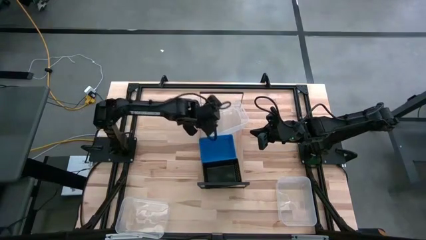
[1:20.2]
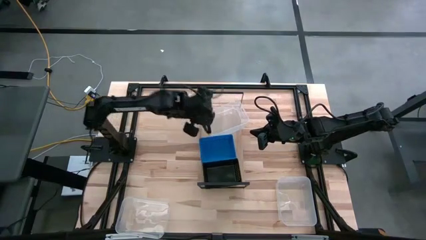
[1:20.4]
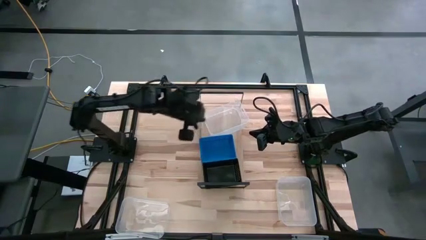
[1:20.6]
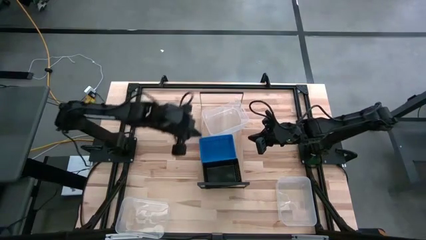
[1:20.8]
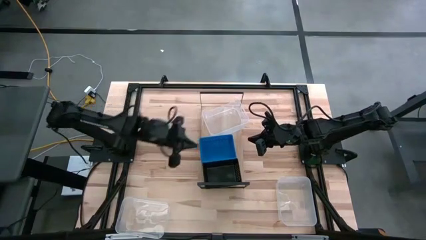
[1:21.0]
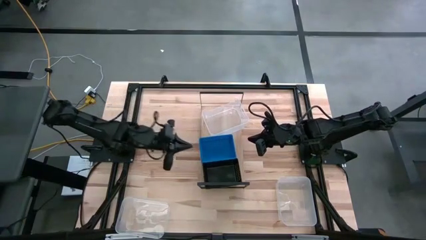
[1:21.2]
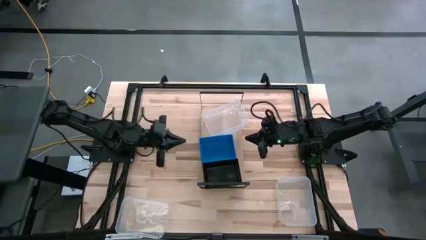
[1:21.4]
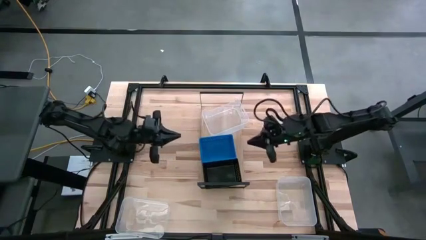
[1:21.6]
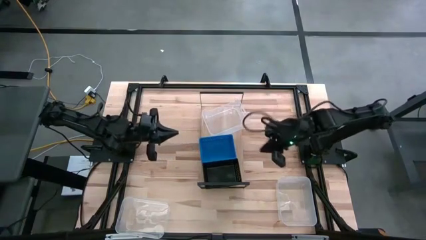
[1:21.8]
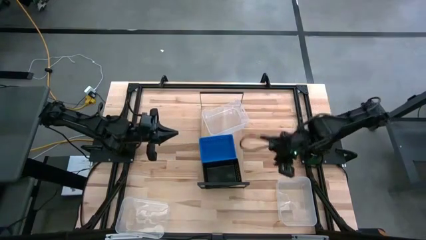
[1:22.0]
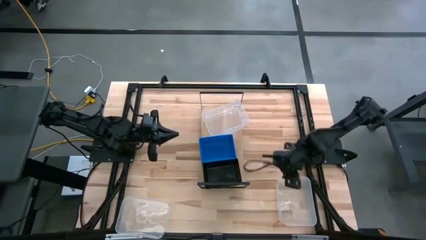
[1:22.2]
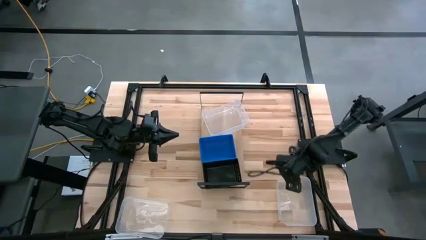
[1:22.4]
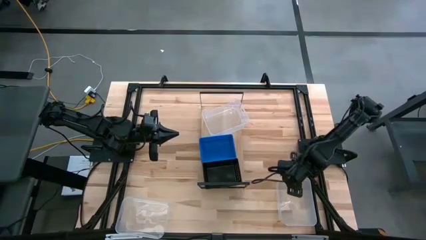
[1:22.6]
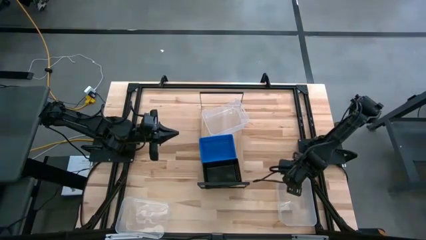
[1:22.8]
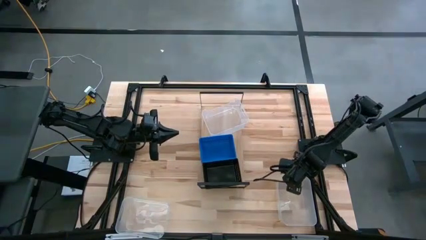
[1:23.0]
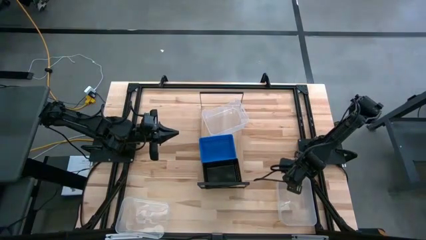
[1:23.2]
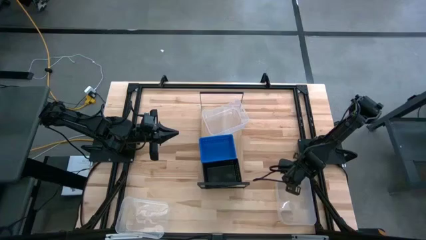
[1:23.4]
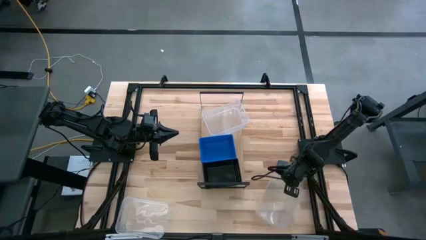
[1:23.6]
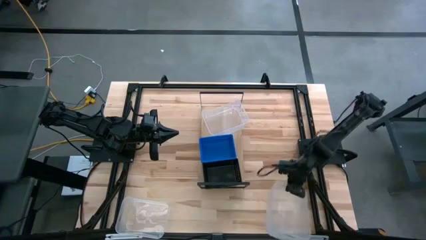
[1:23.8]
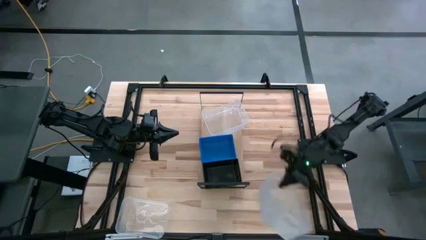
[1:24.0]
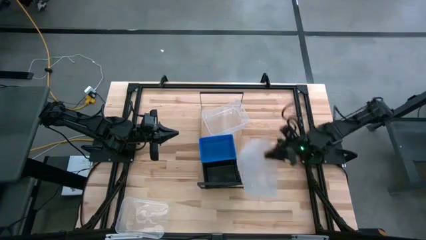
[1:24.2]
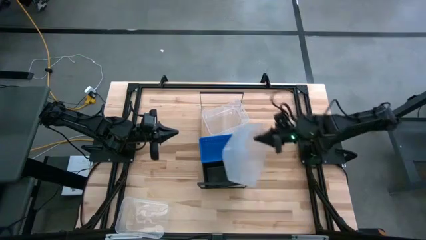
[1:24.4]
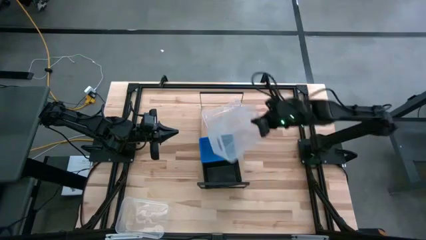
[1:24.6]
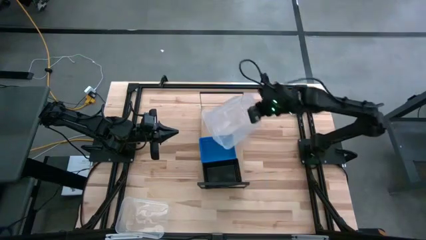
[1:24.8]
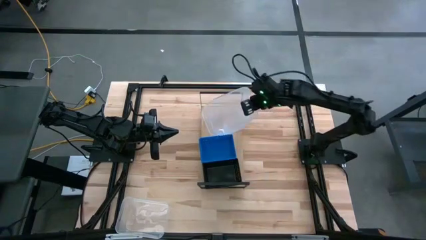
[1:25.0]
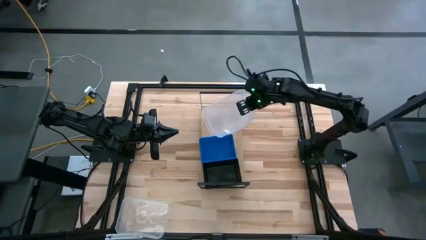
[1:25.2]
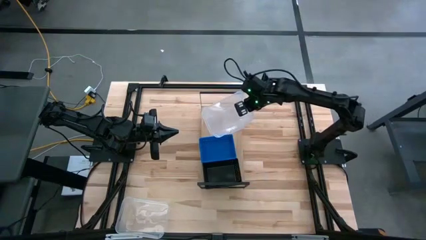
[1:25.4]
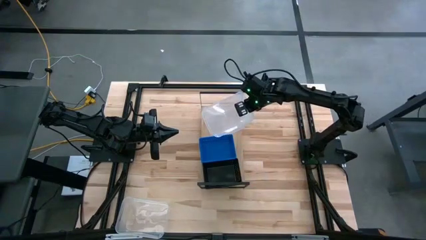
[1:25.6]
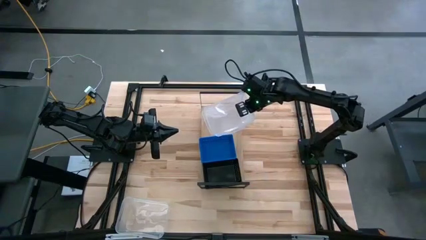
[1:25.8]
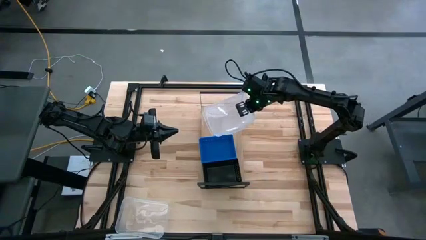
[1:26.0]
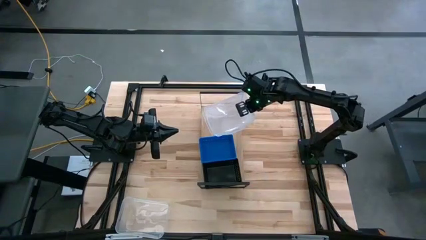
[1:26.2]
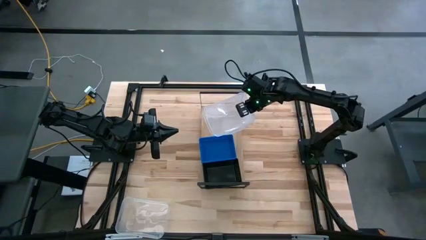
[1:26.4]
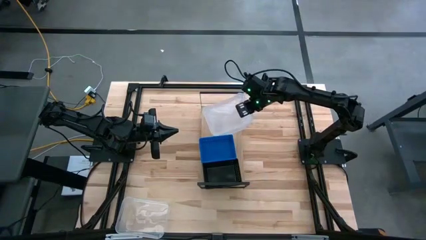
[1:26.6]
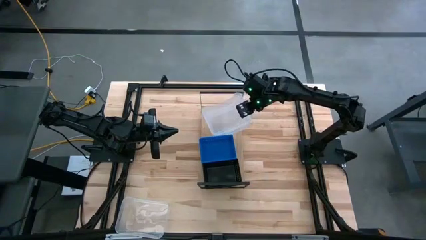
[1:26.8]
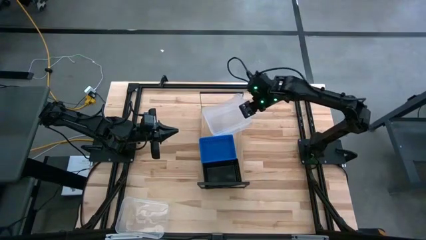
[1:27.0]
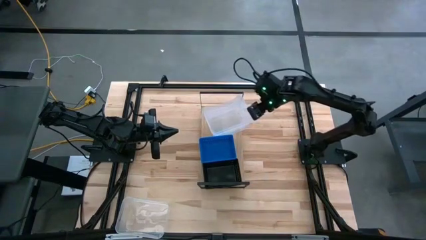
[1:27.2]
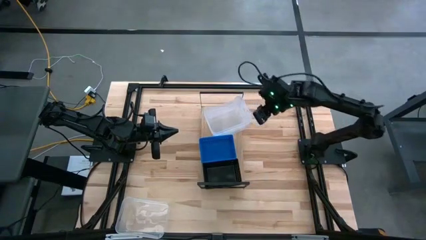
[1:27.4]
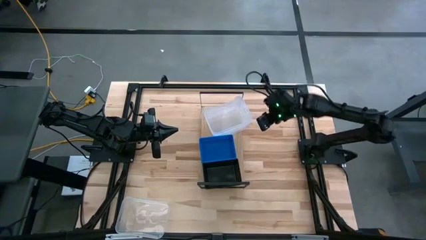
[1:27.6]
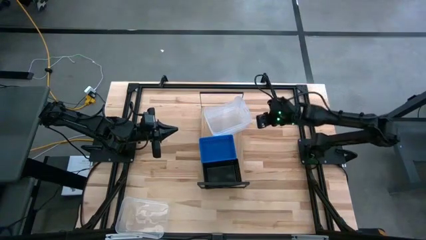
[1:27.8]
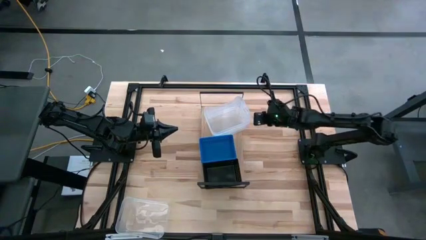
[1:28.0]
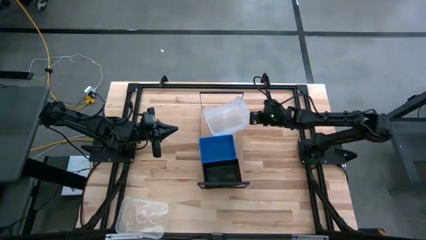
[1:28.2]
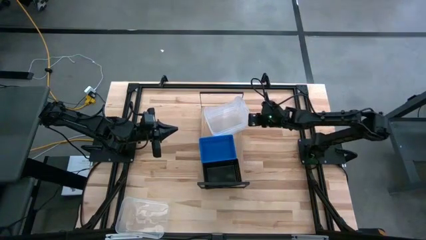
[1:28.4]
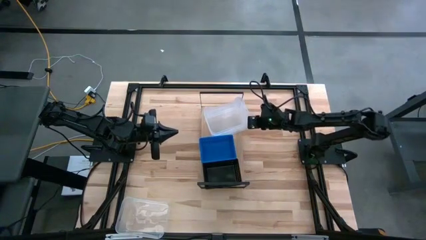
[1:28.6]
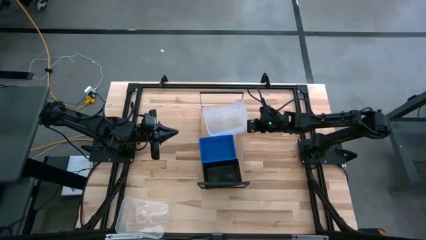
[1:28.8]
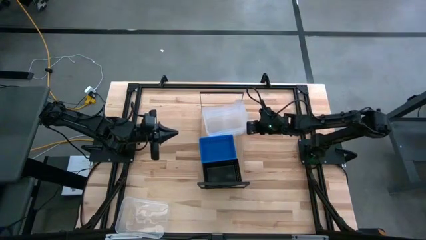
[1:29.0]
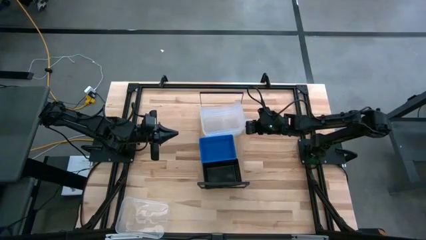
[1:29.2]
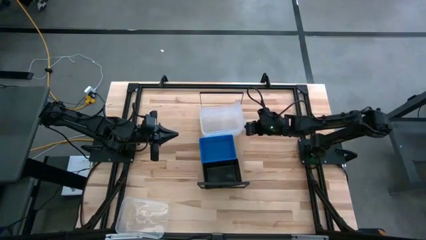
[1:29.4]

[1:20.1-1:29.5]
Task: Stack baskets on shelf by color
Stack the right transparent bin on top of the other transparent bin on the shelf

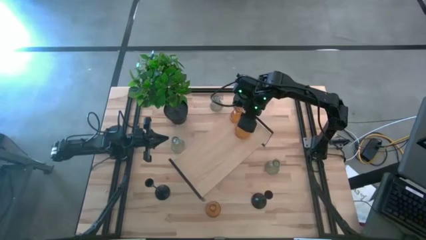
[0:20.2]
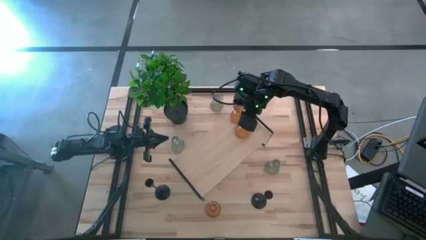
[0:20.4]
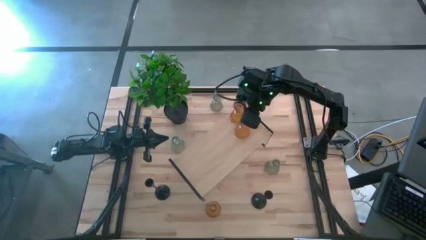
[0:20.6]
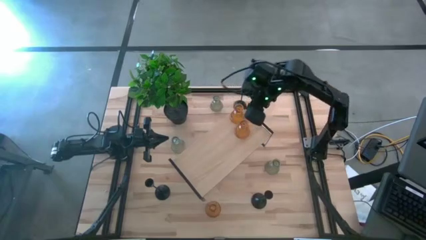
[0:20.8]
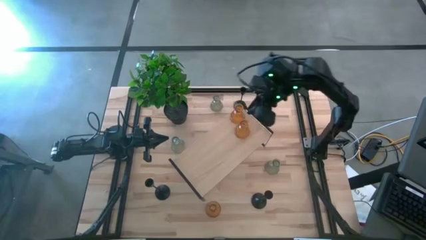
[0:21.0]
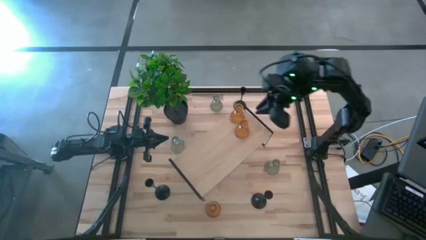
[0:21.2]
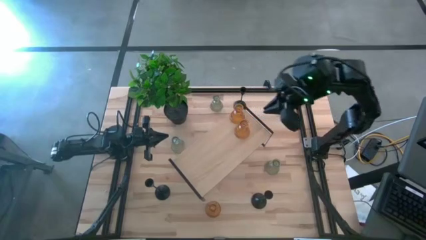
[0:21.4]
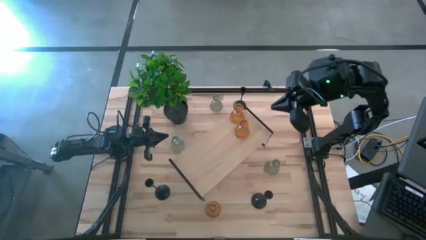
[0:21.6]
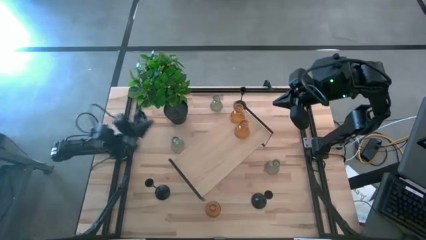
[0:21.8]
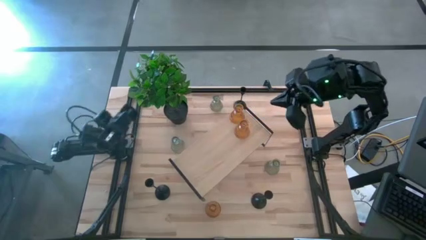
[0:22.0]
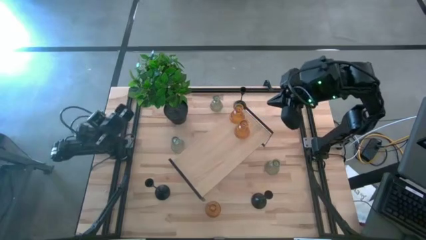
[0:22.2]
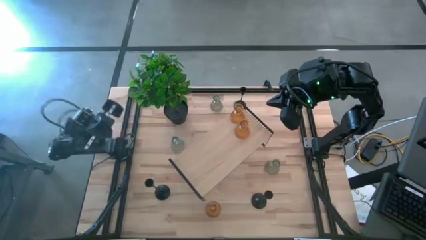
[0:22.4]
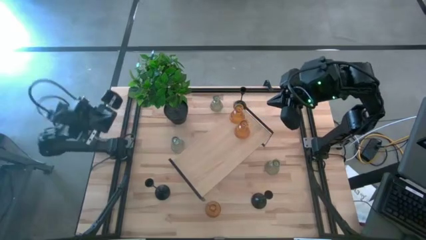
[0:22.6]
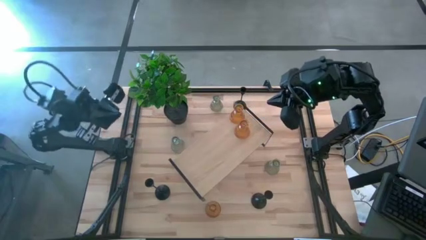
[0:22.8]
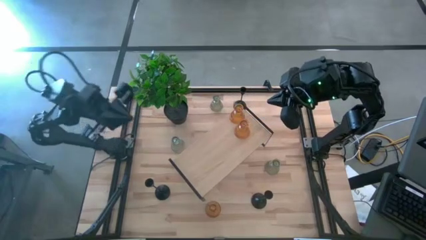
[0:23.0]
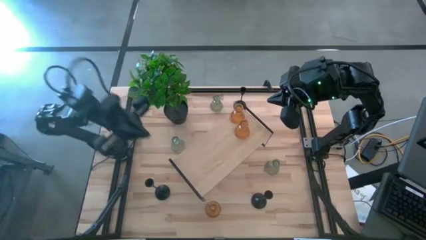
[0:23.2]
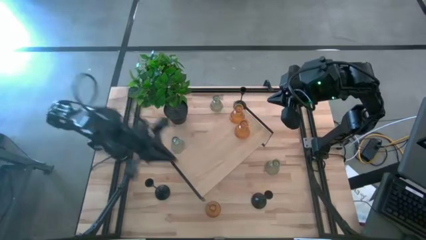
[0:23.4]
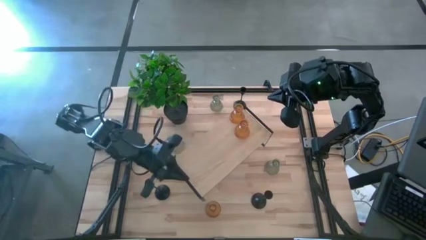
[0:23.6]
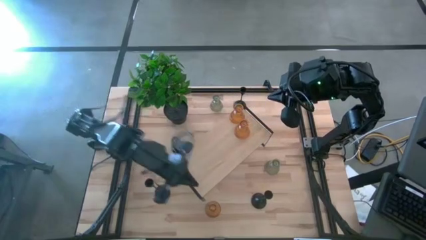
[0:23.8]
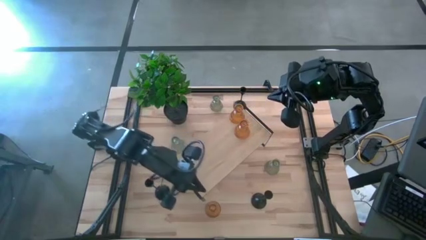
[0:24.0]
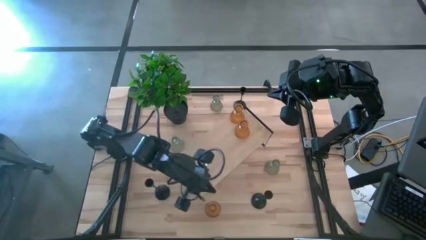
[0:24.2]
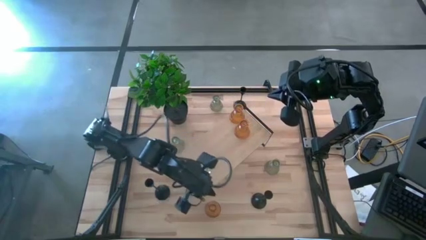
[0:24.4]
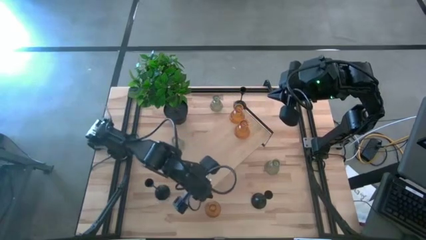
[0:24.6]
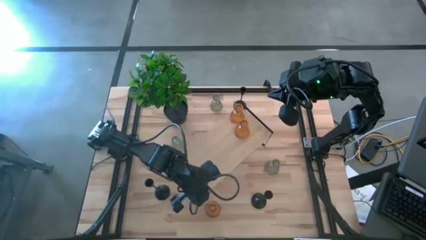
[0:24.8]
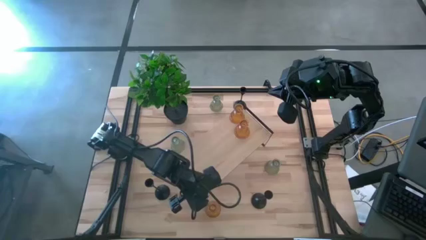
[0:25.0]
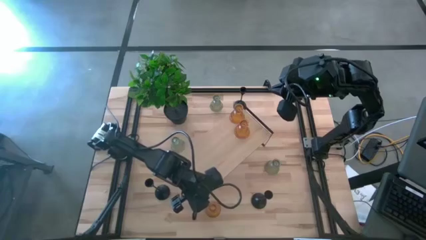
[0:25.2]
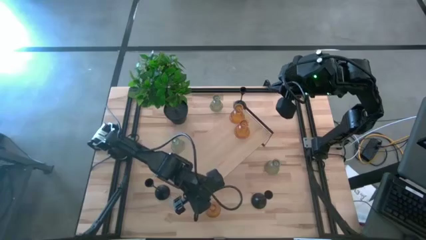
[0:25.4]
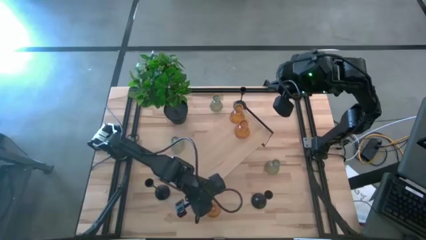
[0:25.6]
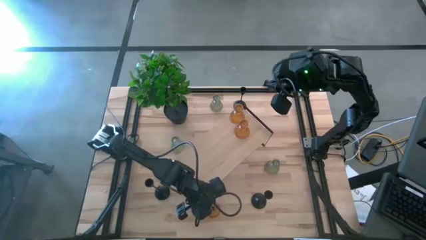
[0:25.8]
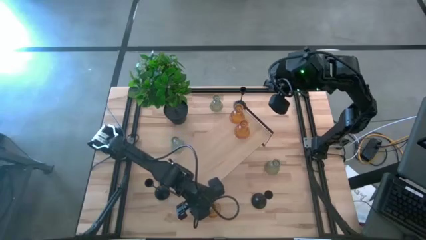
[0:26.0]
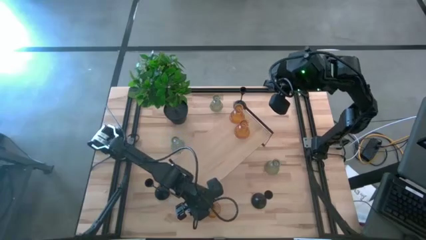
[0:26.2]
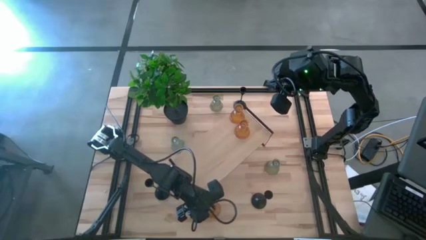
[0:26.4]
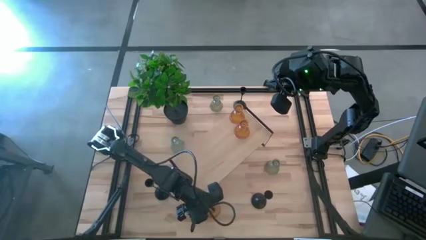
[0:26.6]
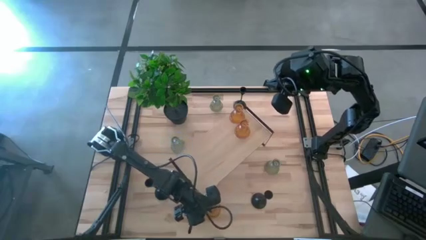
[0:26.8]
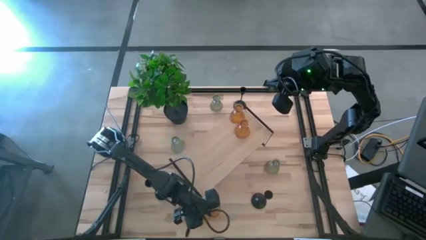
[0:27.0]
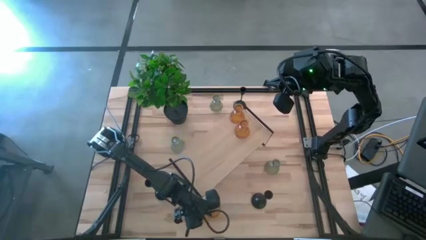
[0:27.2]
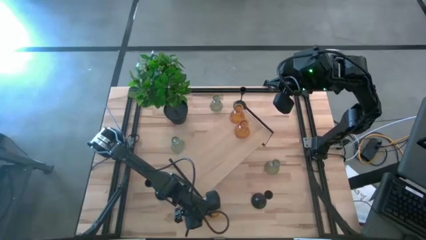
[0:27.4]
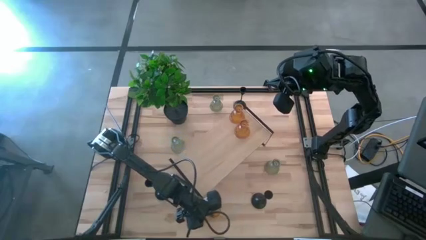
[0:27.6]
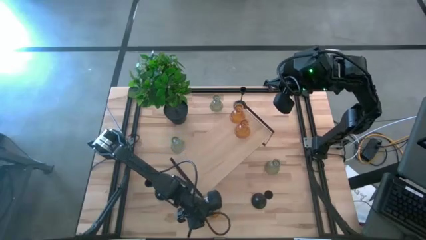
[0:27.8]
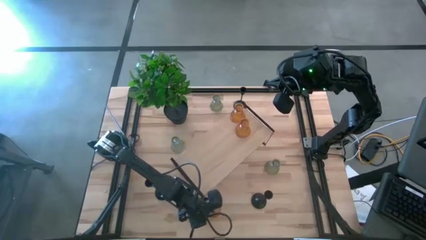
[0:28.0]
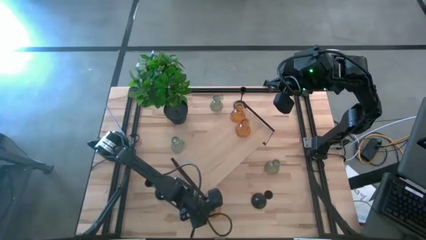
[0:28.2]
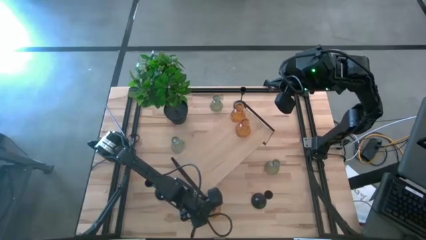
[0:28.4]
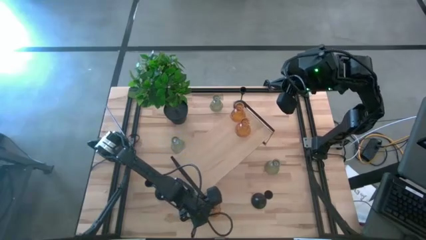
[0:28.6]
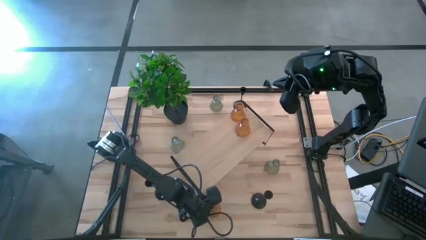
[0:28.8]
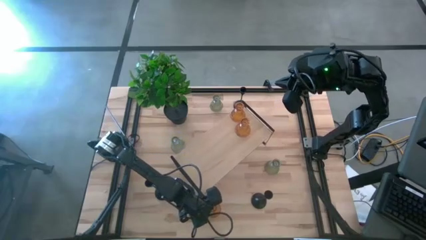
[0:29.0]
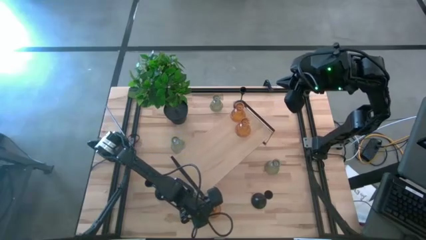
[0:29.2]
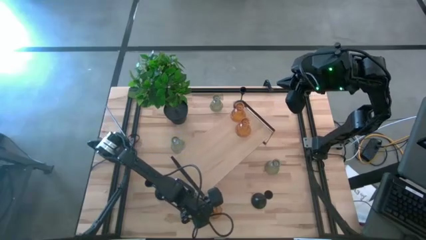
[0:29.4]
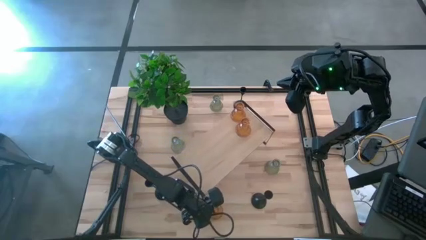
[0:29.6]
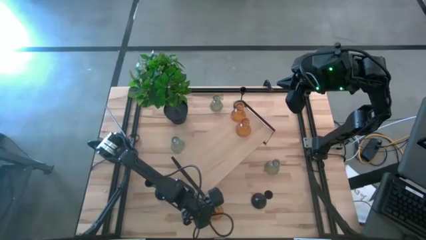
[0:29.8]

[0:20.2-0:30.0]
Task: Pick & Place candle stick holders
Put the yellow glass candle holder on the shelf
